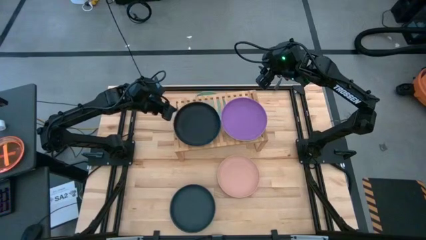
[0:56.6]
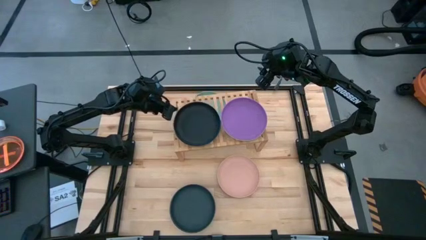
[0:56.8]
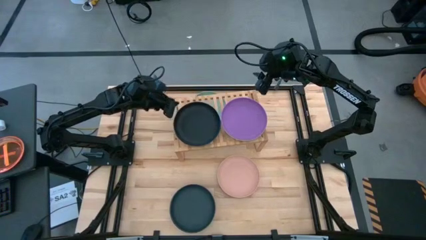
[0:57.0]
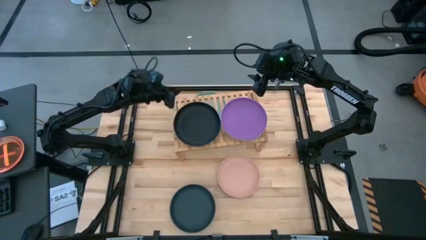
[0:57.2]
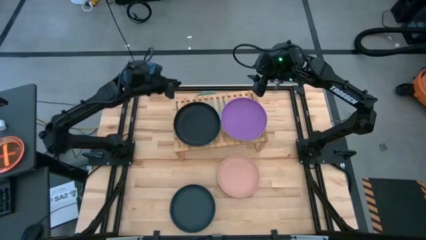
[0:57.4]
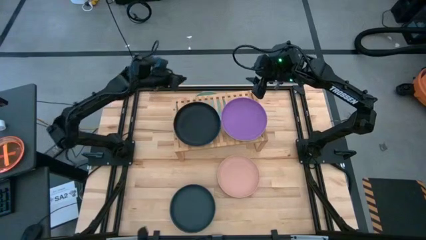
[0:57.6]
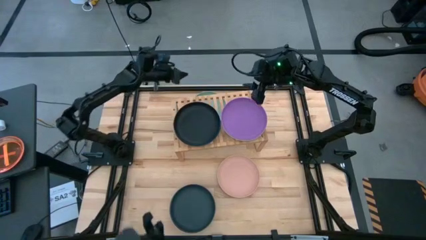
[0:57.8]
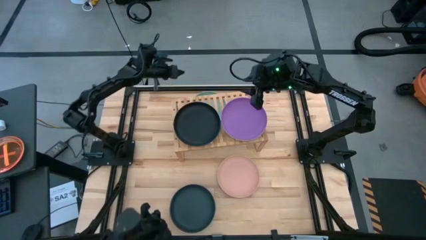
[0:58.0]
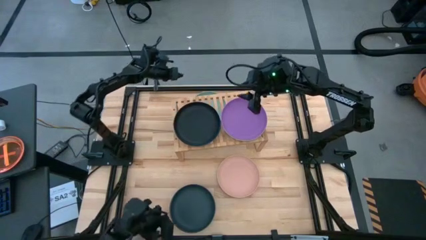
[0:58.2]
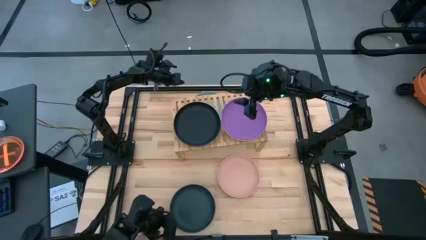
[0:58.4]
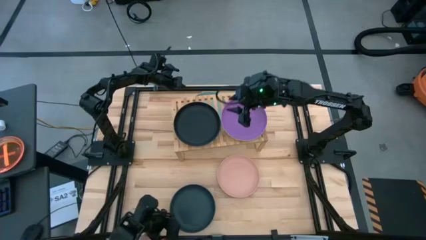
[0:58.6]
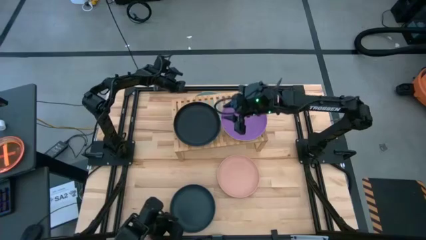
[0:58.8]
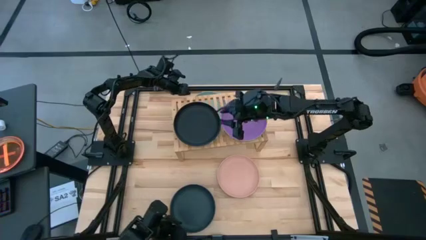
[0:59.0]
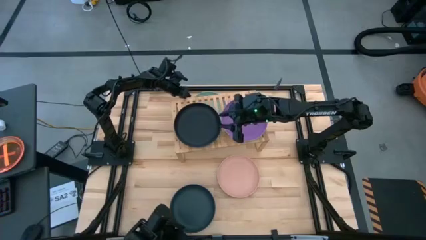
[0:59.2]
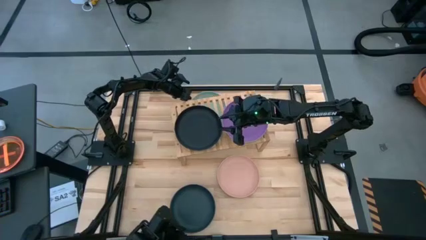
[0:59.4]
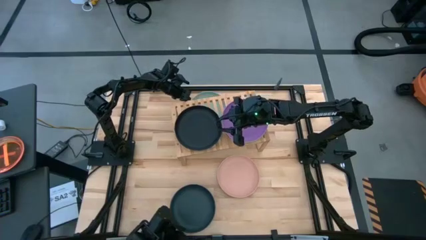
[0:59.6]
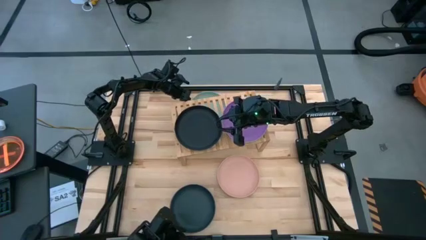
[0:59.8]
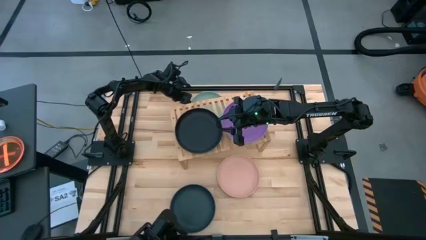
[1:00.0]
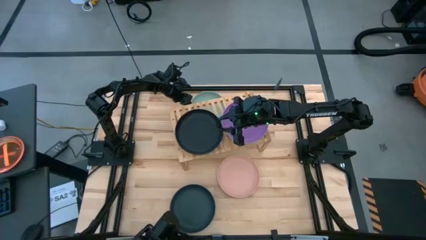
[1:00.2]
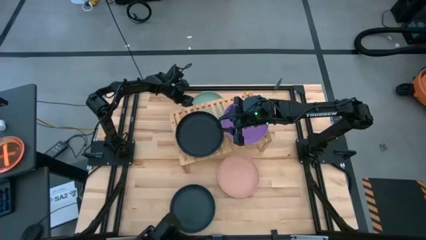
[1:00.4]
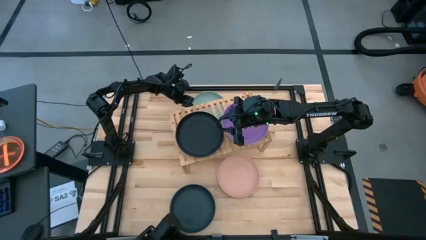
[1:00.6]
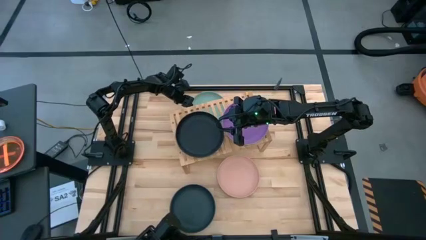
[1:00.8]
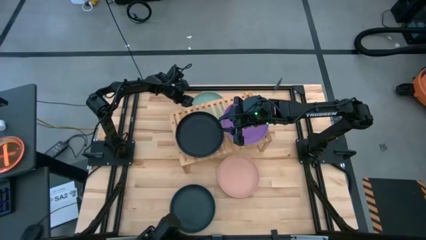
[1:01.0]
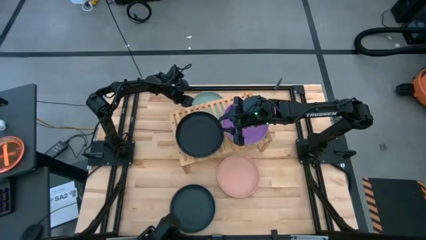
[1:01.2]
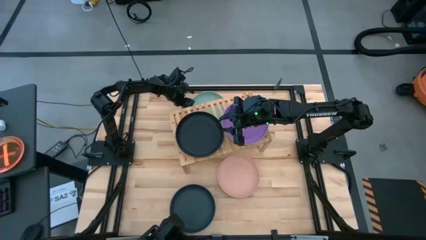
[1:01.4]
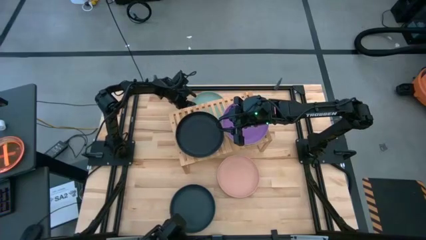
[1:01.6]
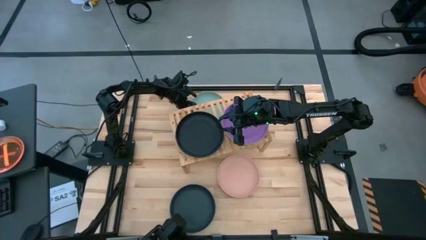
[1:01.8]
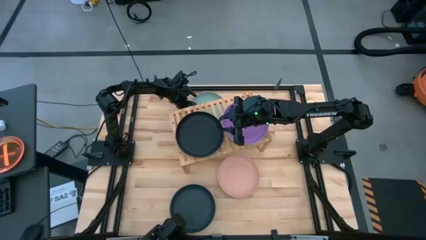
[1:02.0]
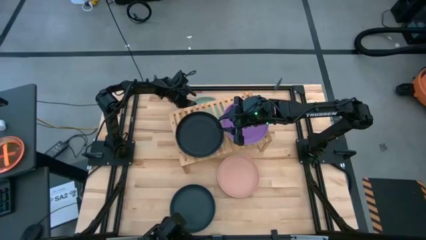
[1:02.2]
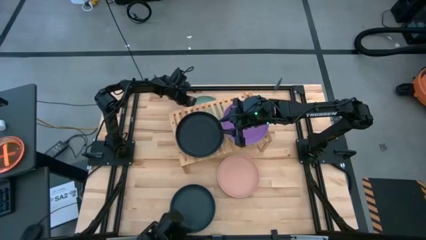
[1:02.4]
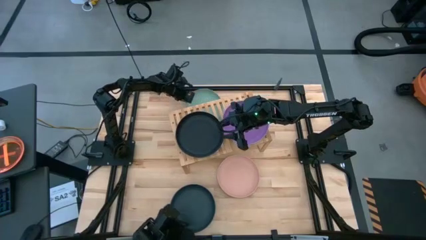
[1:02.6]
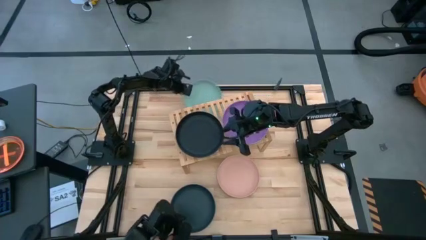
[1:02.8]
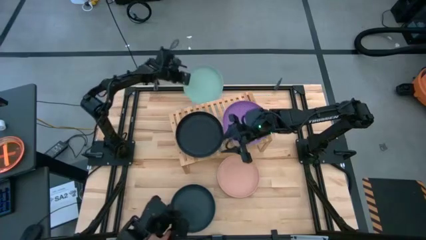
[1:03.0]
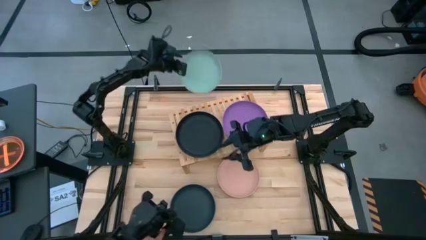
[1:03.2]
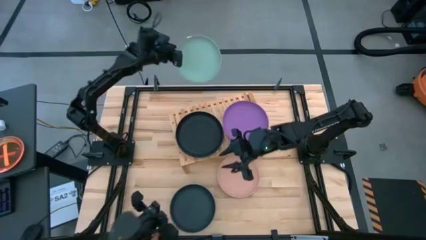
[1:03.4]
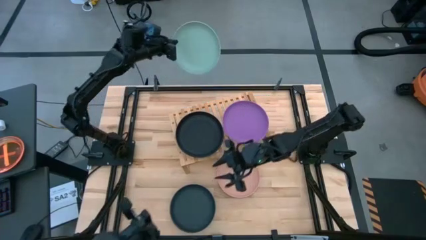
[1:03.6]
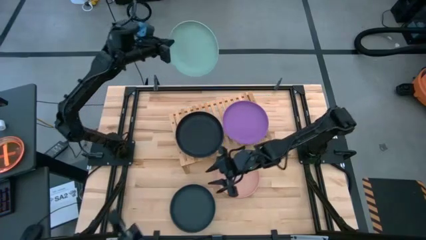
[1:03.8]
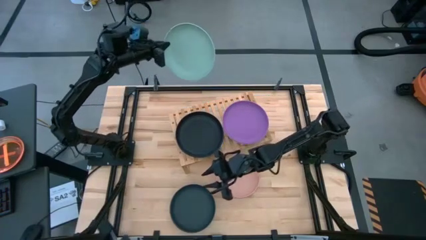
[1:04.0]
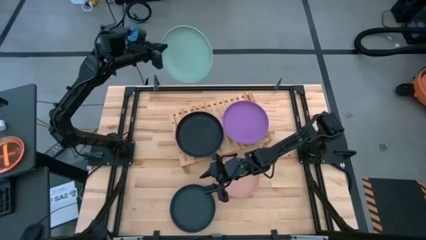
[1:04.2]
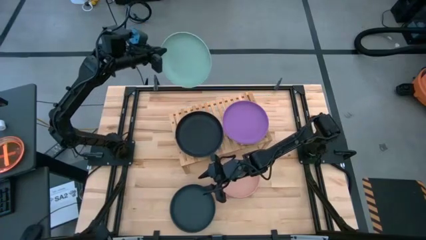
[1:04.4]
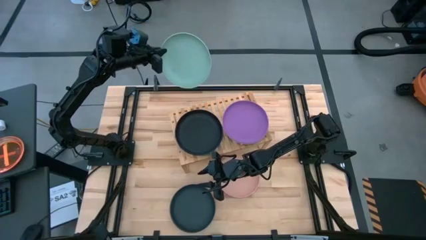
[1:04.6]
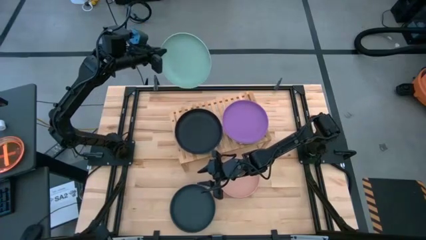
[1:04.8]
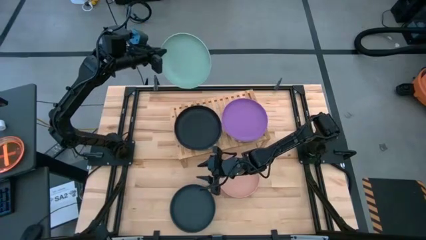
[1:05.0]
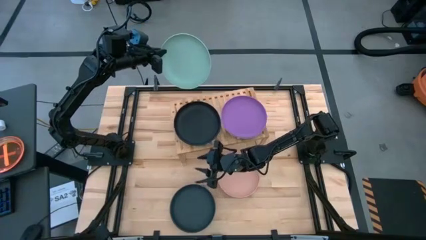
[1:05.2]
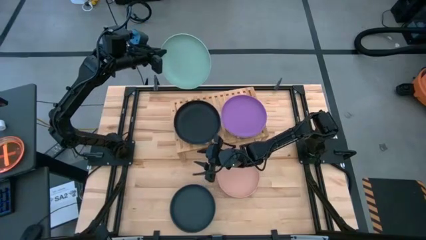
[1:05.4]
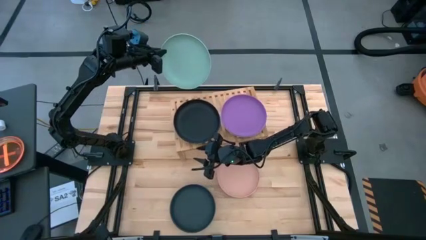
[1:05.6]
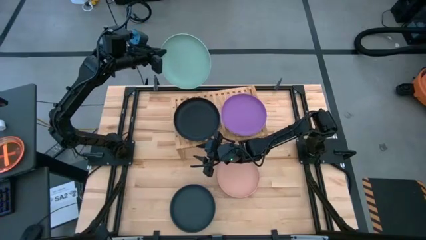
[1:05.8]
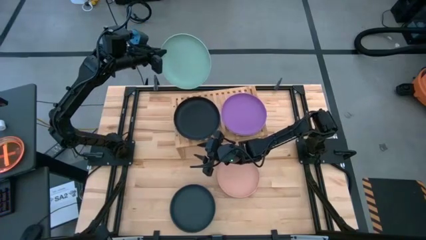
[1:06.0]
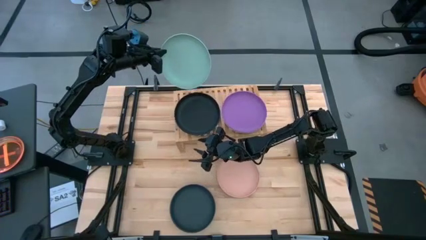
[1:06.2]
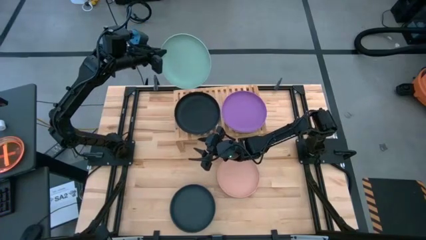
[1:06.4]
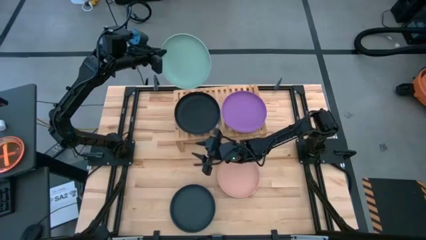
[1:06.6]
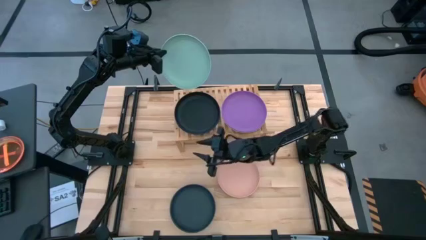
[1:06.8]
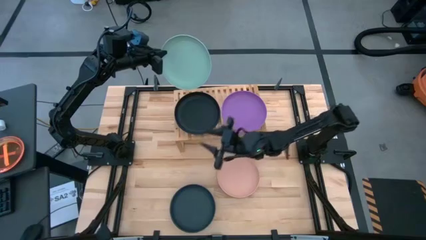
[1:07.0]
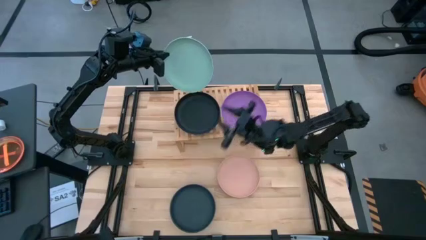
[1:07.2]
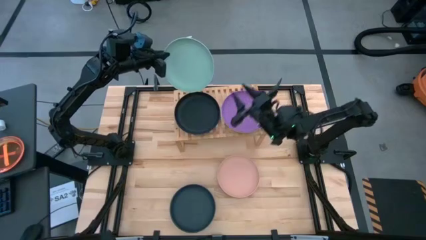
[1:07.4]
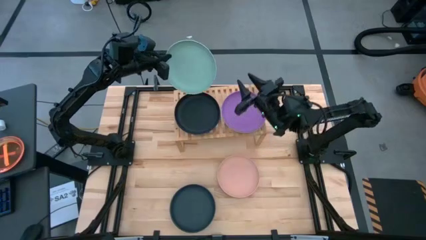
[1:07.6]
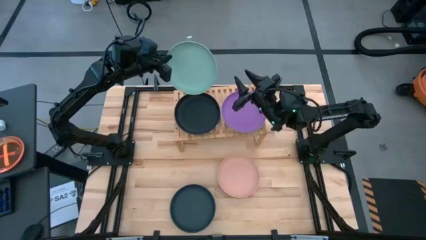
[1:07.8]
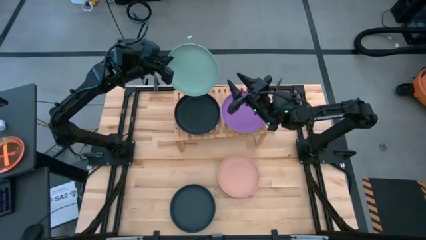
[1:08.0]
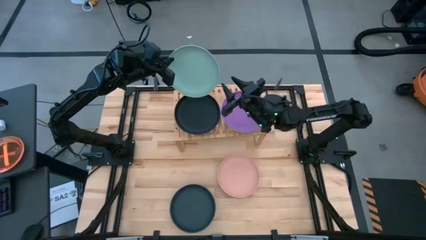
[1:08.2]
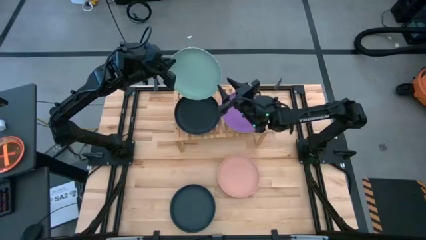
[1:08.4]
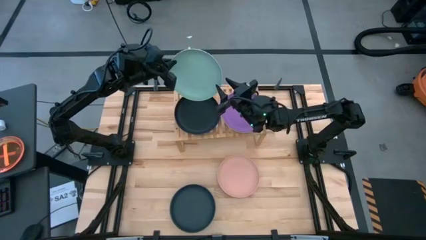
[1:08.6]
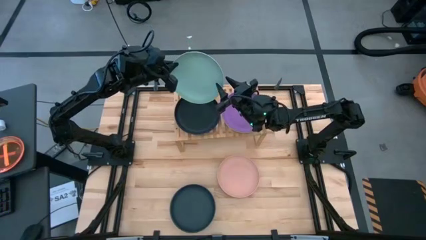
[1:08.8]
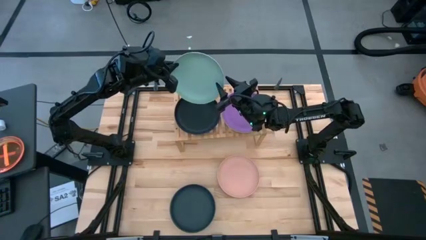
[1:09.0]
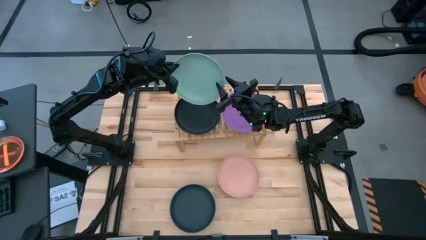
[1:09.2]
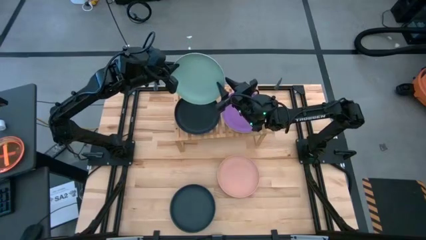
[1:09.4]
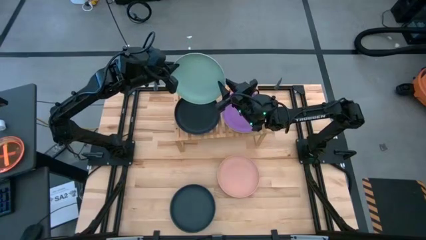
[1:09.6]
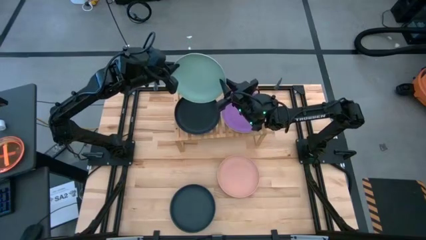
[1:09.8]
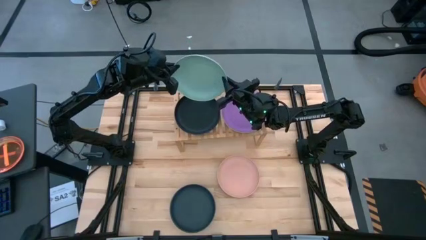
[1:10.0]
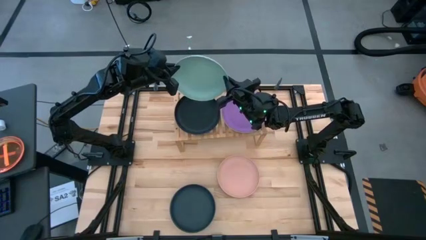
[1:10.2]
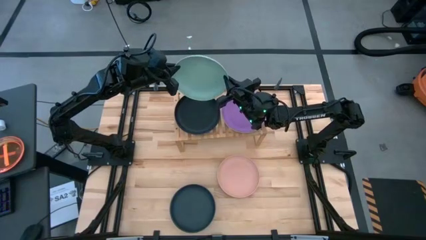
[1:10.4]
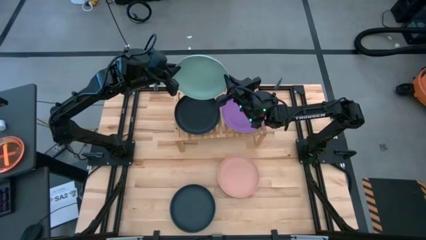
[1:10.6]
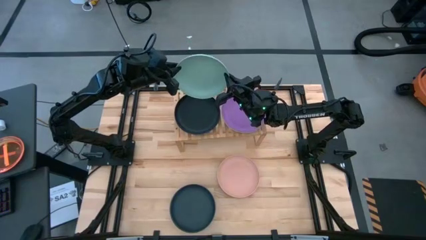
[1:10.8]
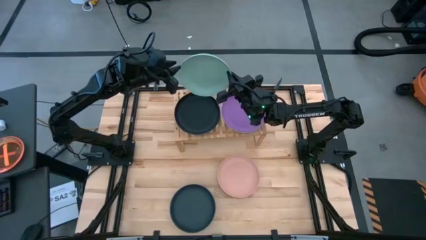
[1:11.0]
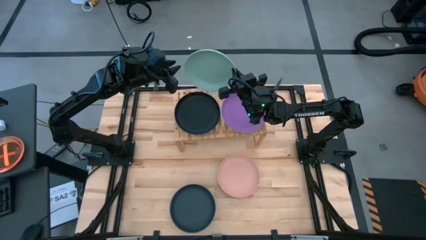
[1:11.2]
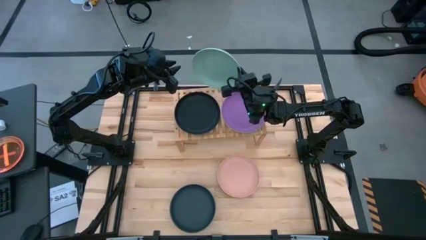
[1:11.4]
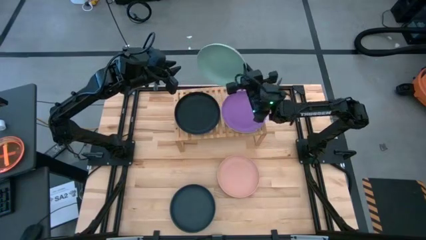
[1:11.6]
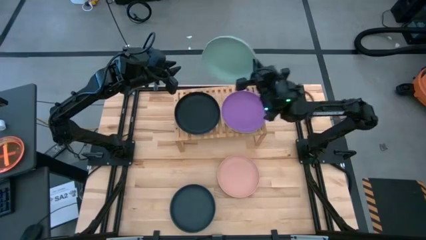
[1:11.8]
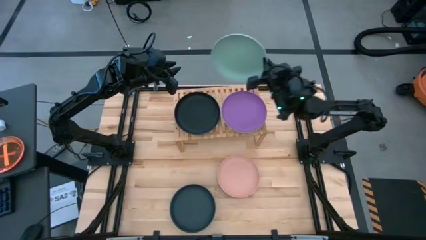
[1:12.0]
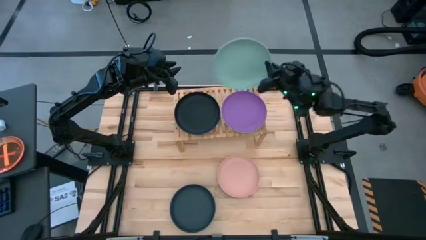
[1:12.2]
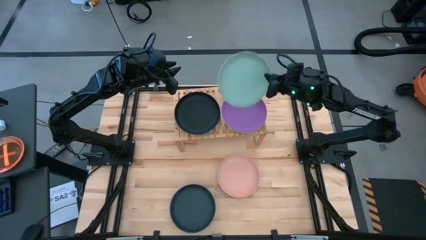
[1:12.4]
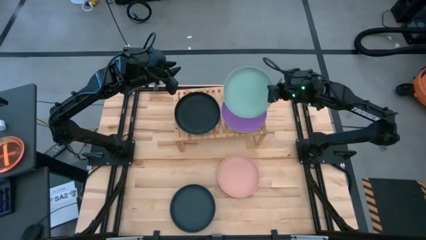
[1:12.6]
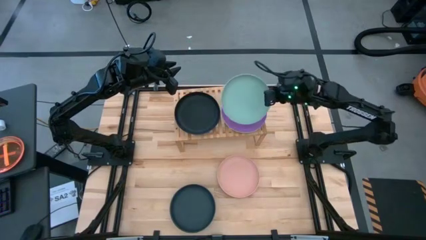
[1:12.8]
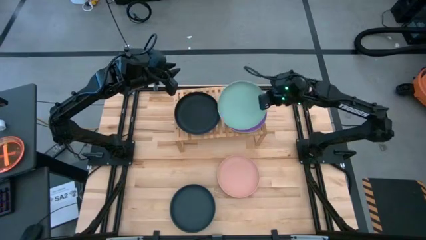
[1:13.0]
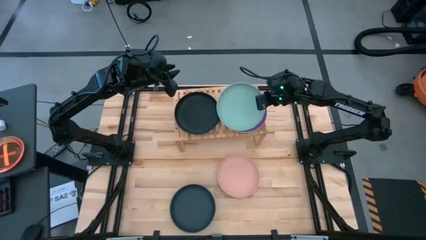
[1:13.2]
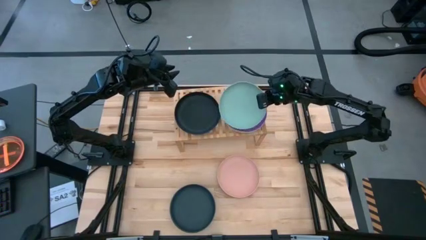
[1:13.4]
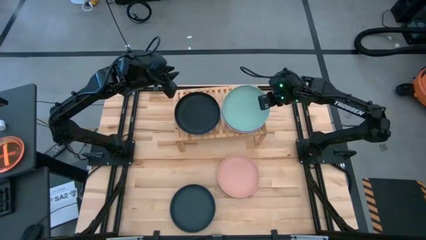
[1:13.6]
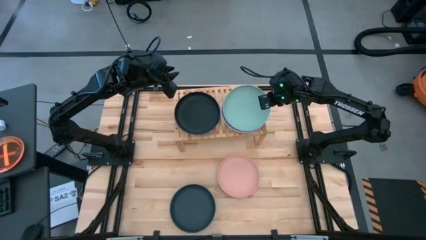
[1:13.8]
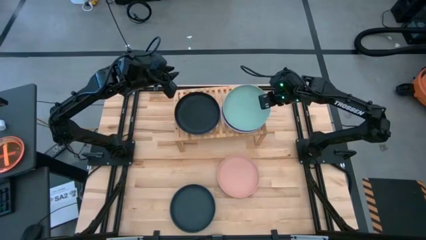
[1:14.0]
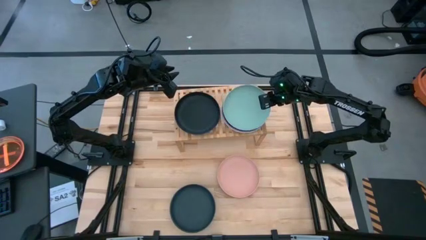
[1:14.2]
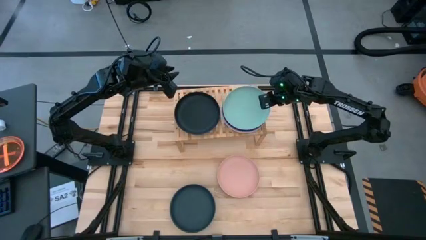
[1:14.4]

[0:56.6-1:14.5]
Task: Place and stack plates onto a shelf
Stack the green plate on top of the purple plate on the shelf
